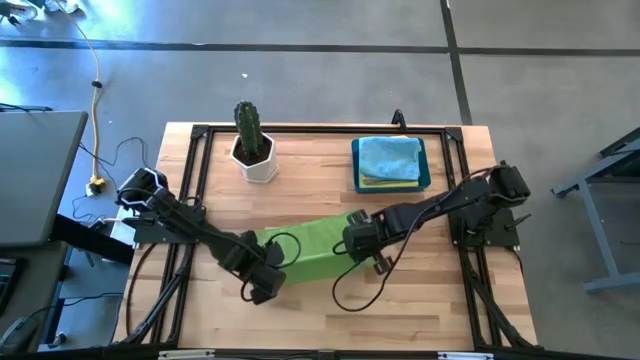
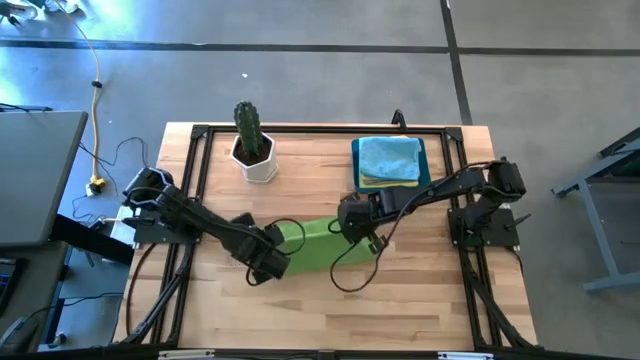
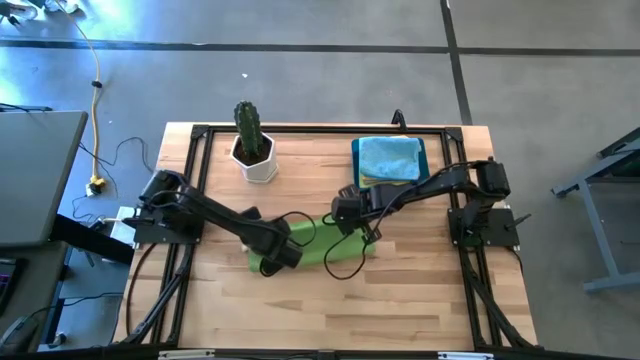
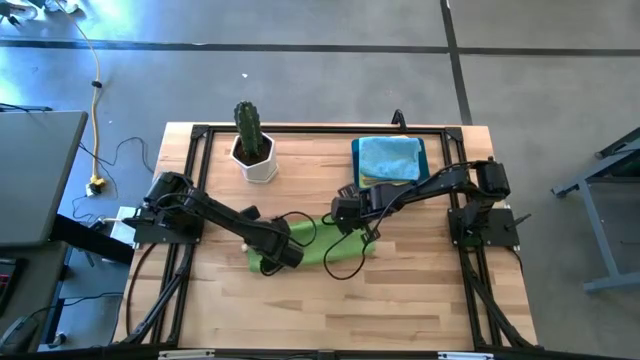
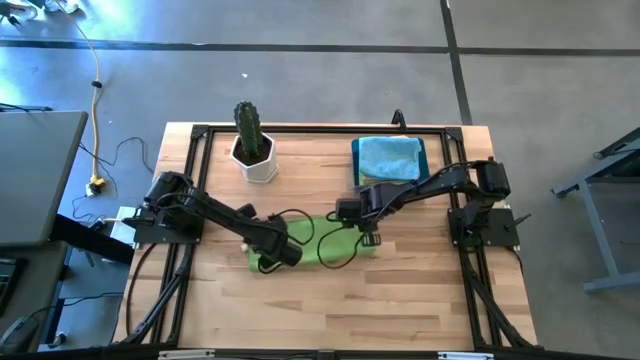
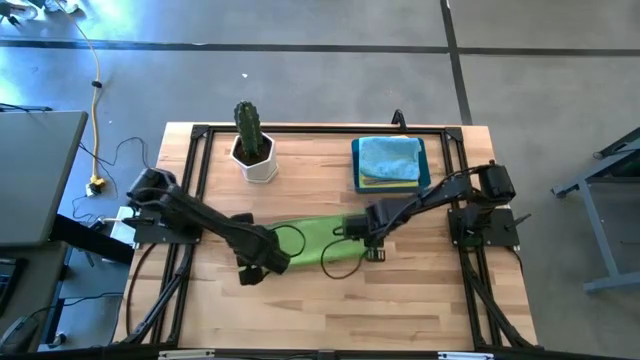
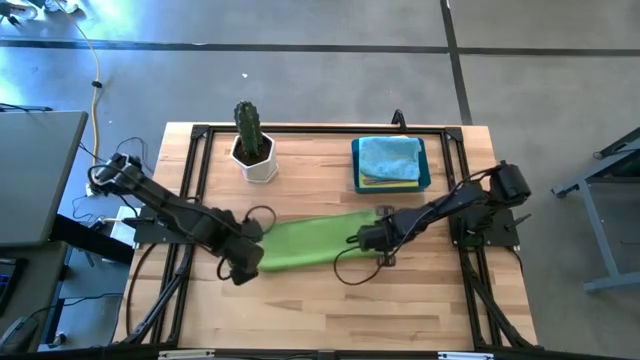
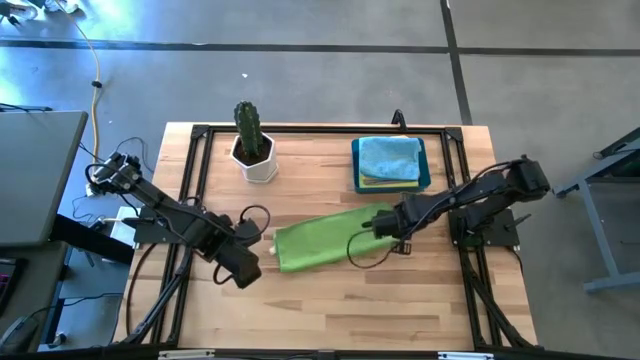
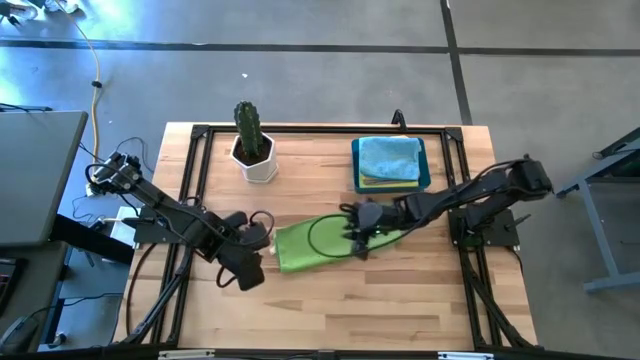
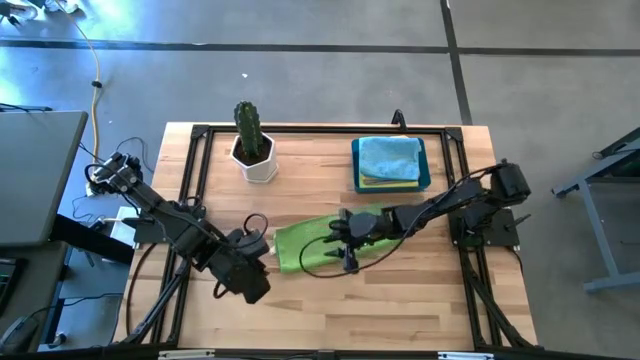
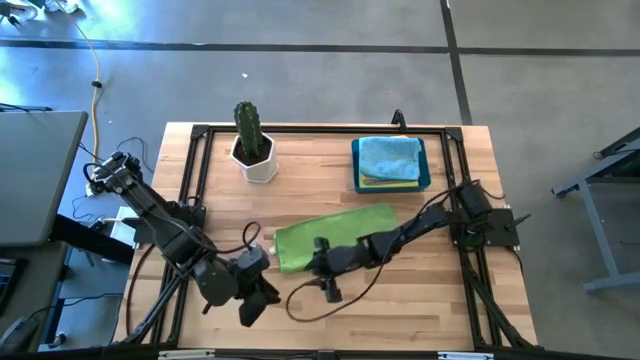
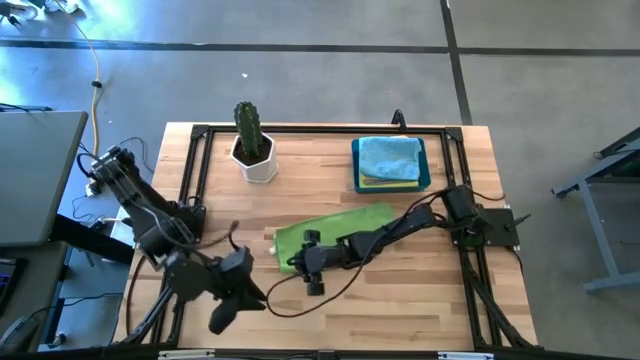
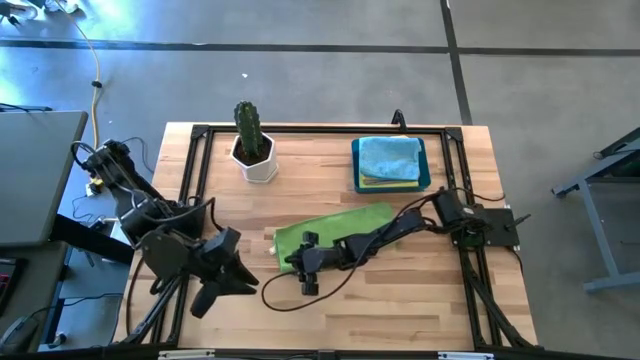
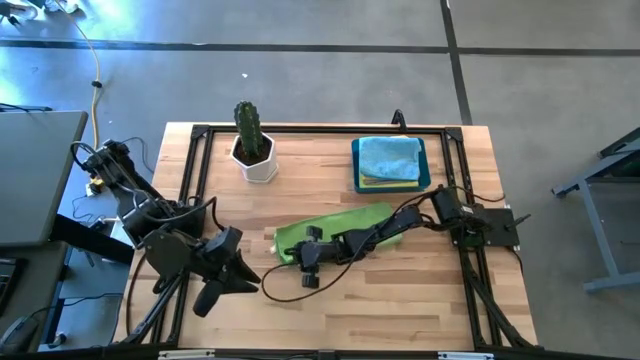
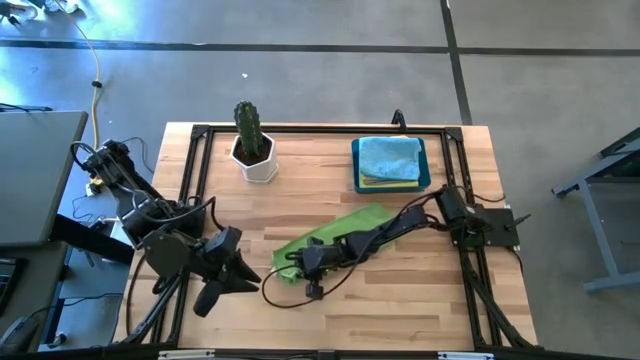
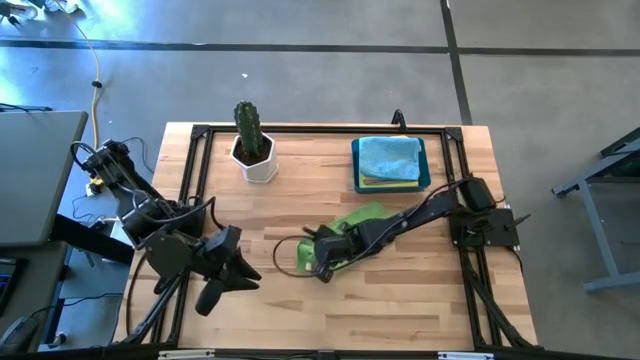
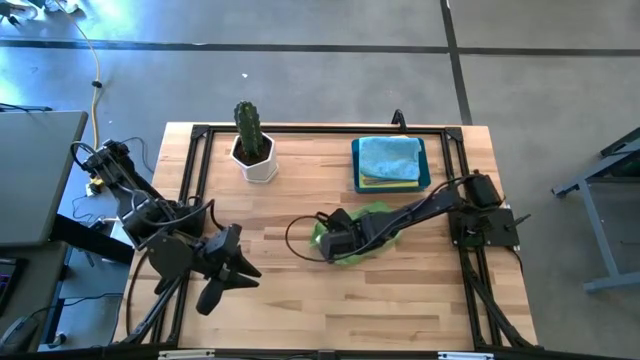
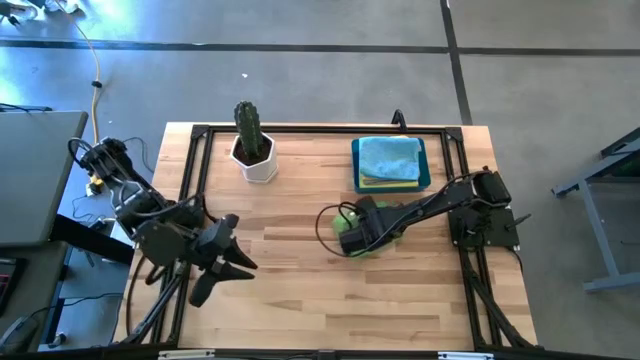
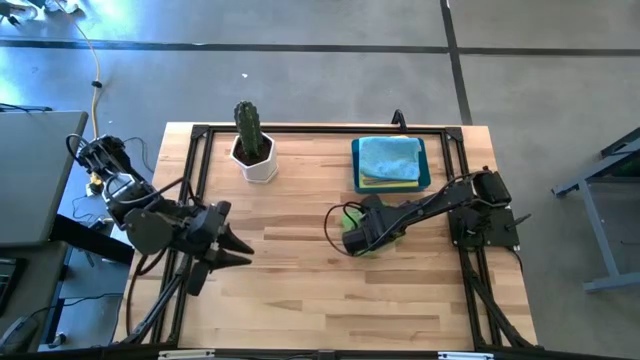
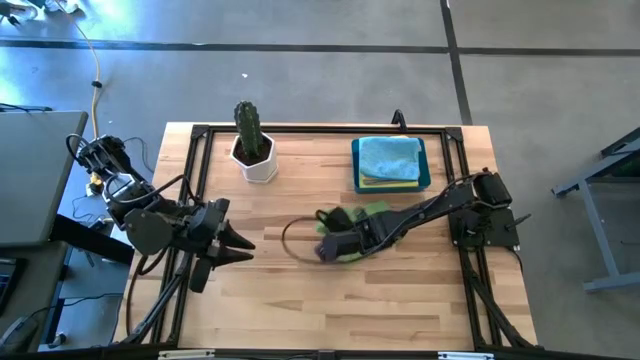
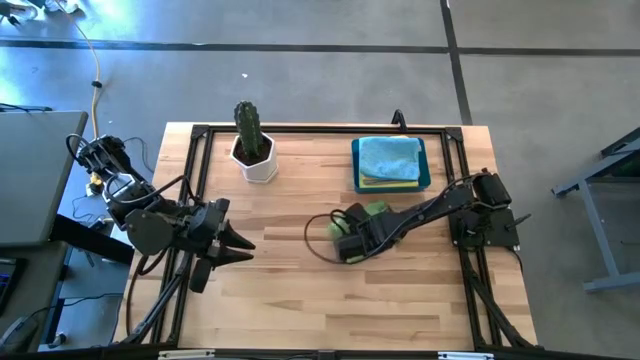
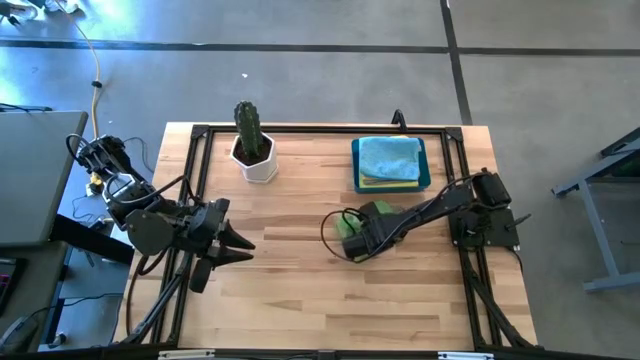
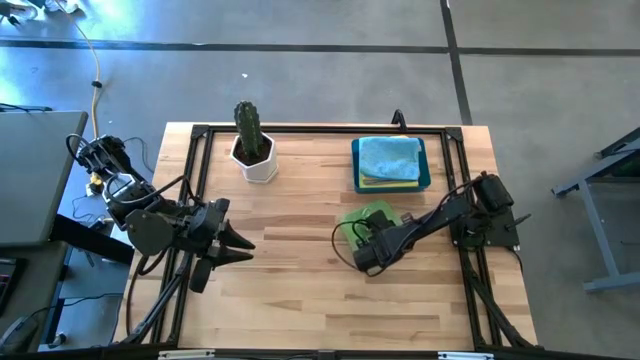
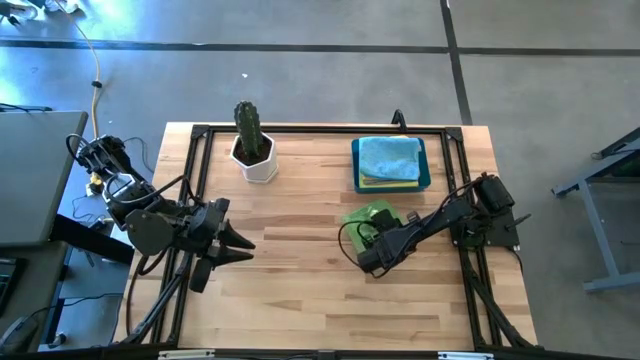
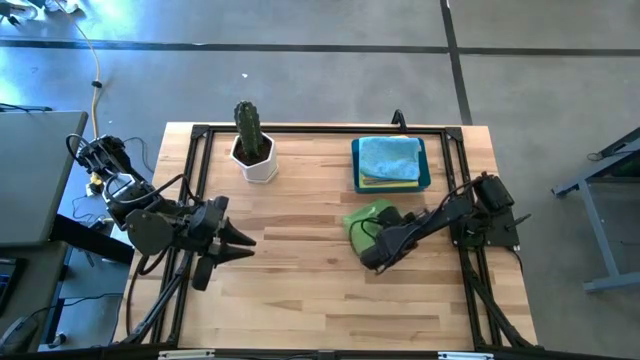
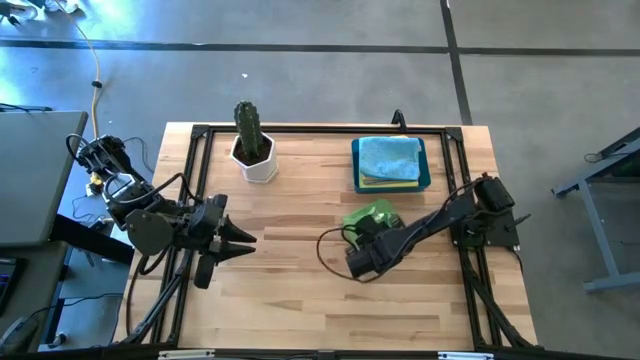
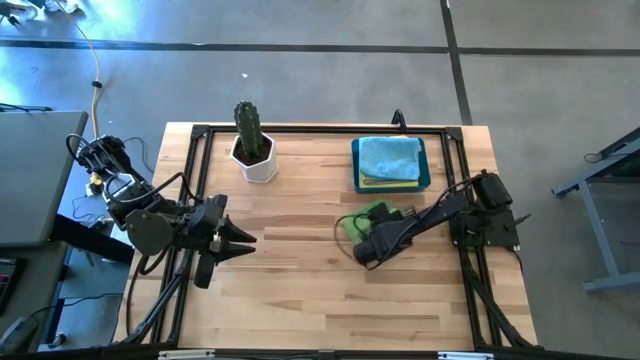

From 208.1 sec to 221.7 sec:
Task: Fold microfiber towels
Fold the green microfiber cloth

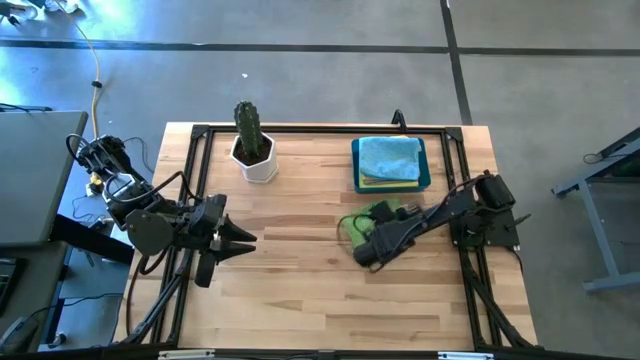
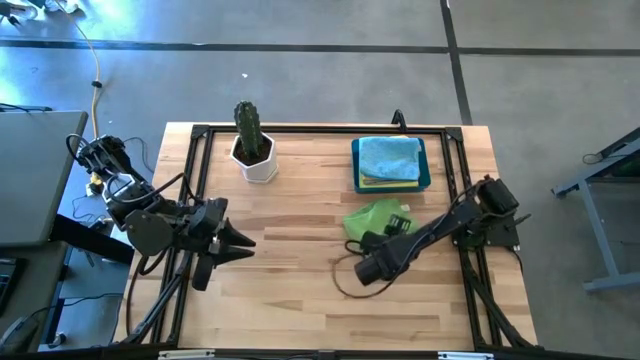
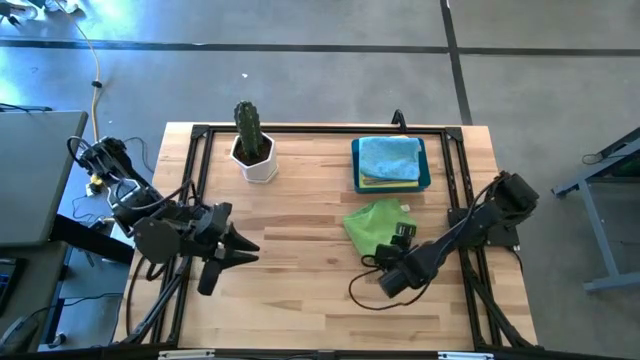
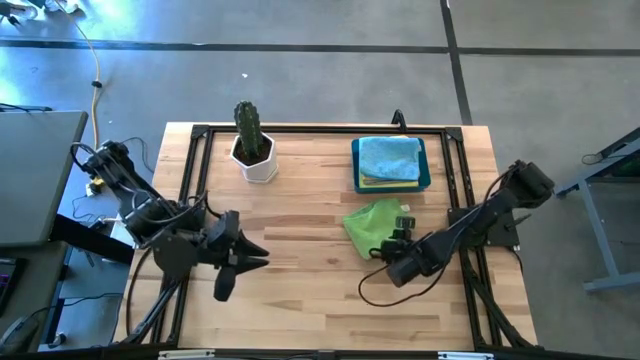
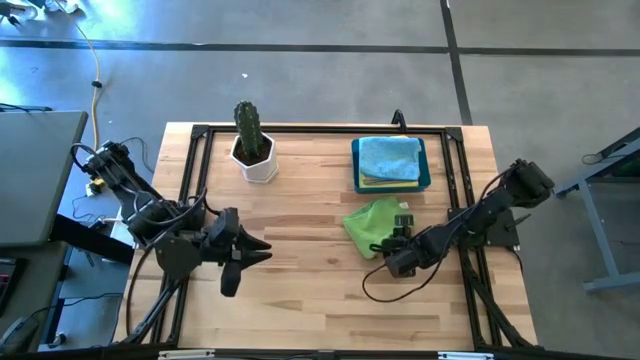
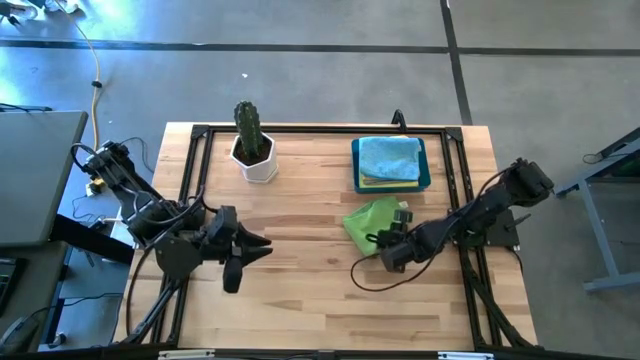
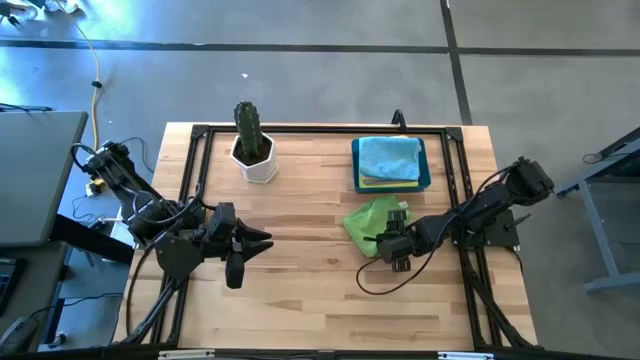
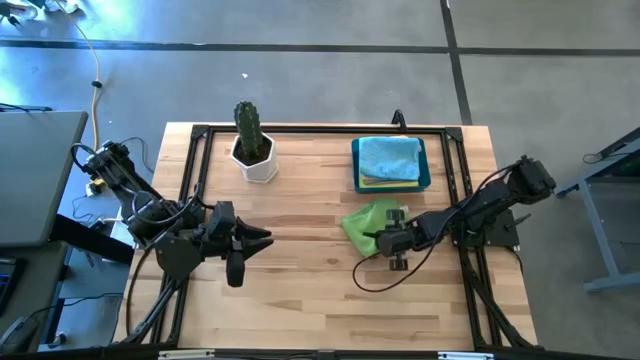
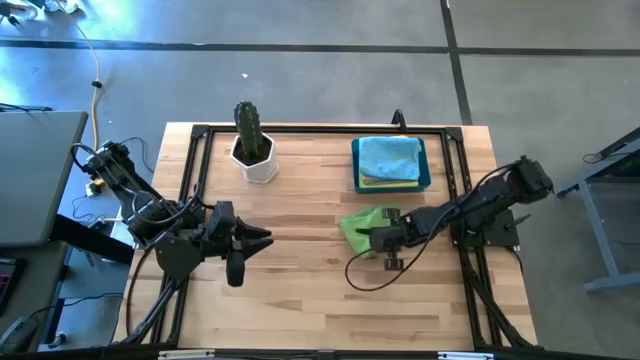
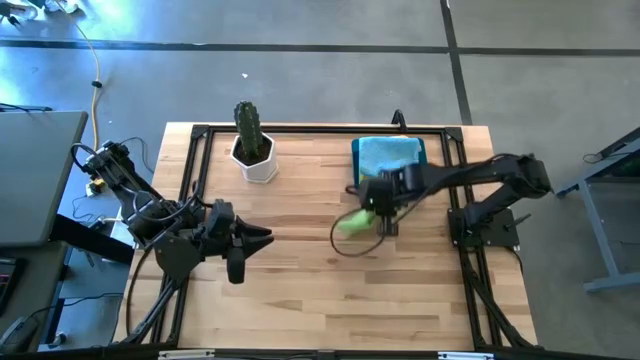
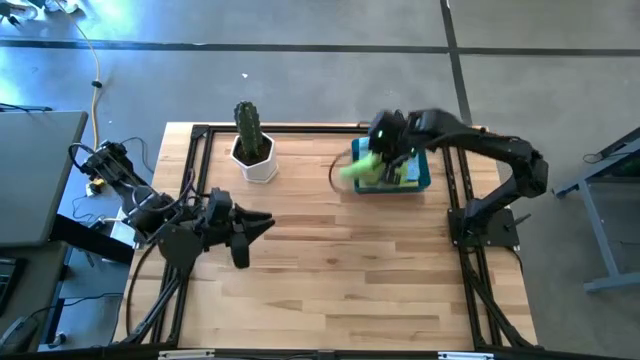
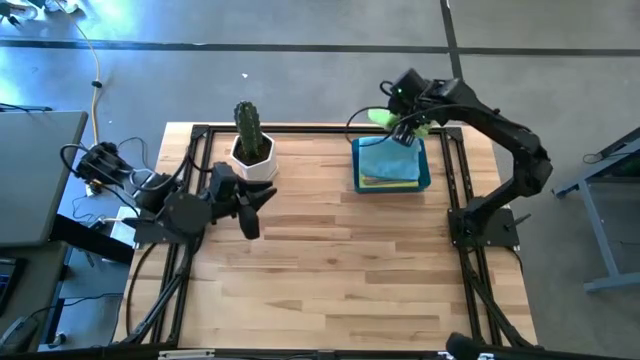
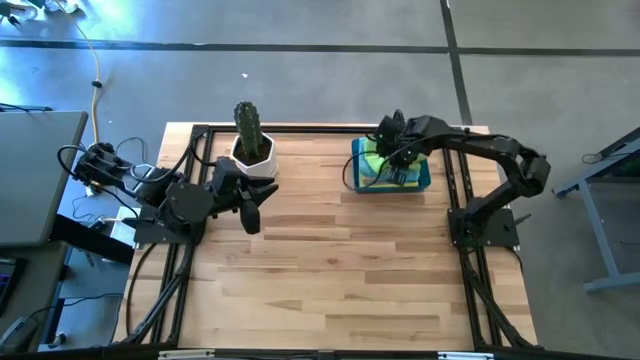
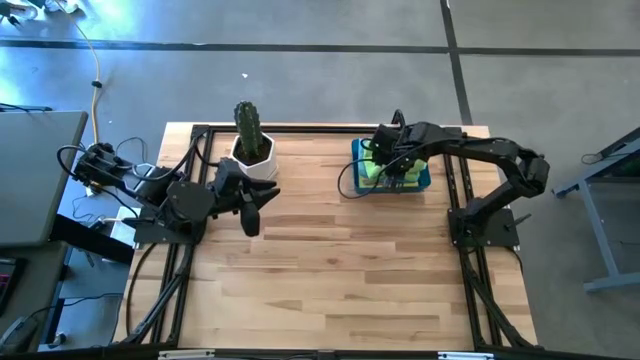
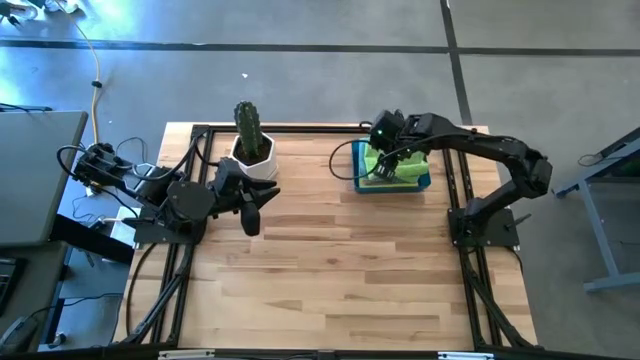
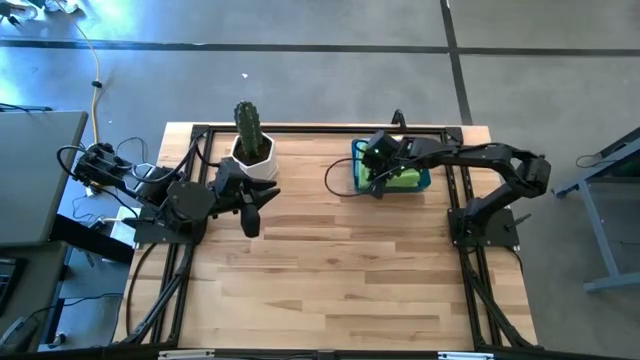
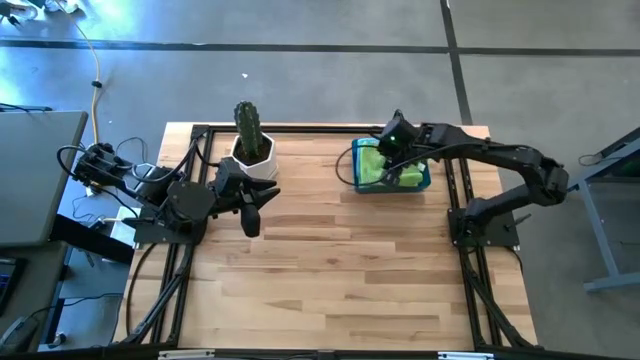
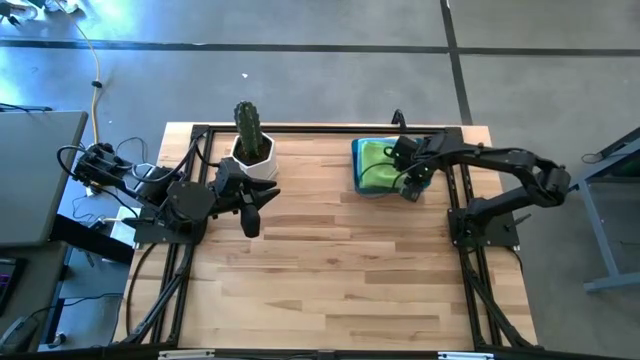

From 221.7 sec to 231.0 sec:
Put the folded green microfiber cloth into the blue bin
